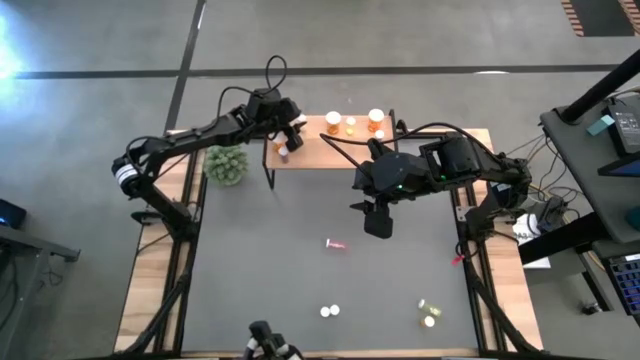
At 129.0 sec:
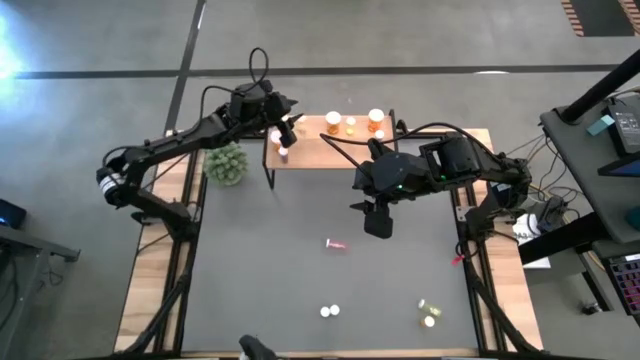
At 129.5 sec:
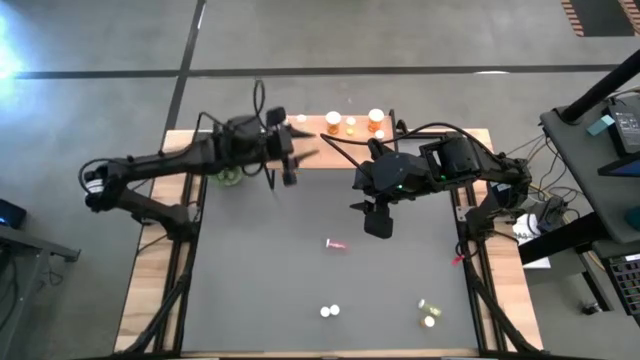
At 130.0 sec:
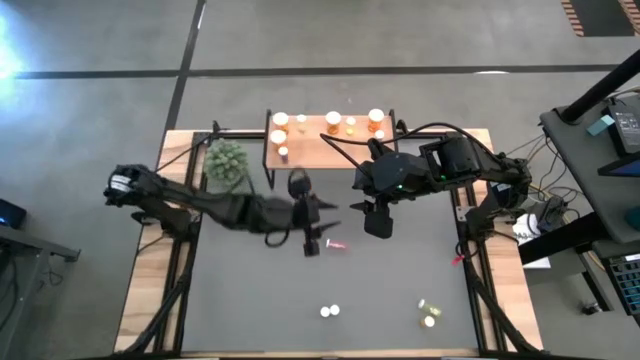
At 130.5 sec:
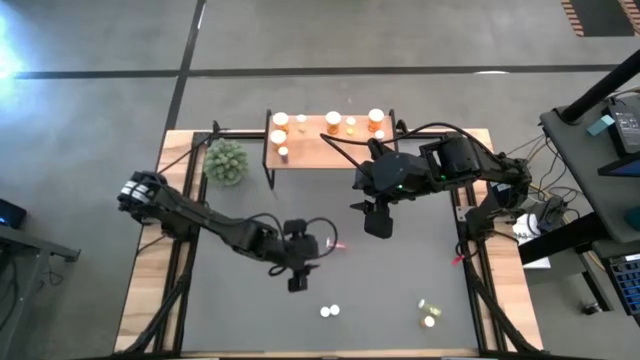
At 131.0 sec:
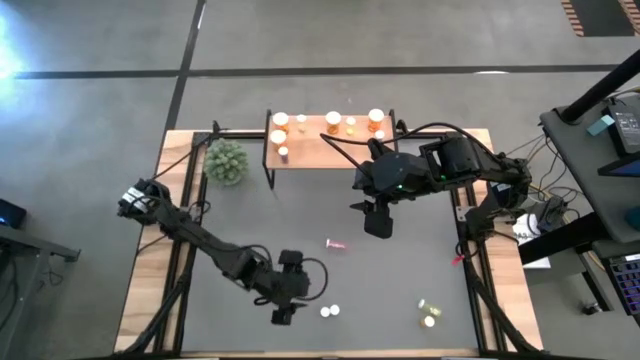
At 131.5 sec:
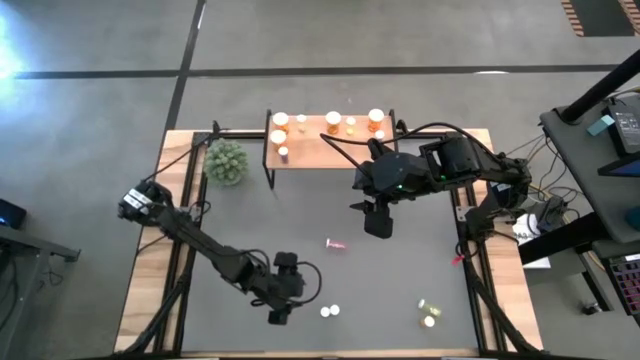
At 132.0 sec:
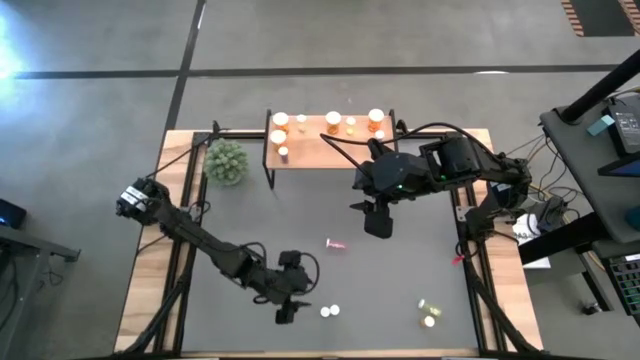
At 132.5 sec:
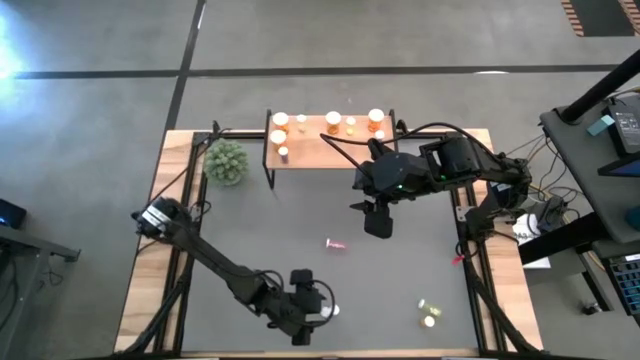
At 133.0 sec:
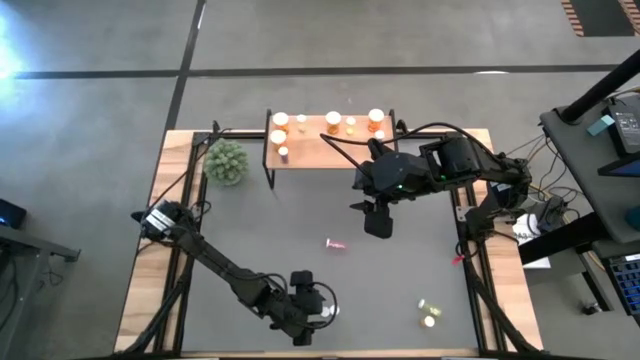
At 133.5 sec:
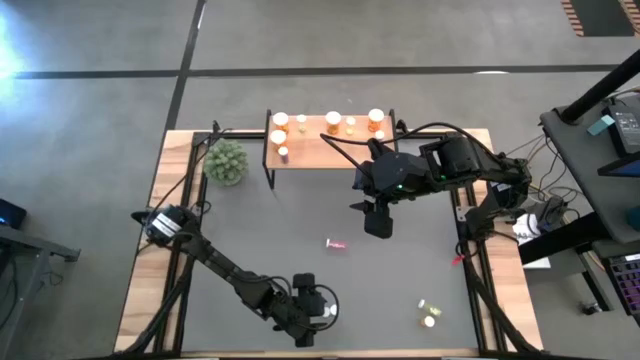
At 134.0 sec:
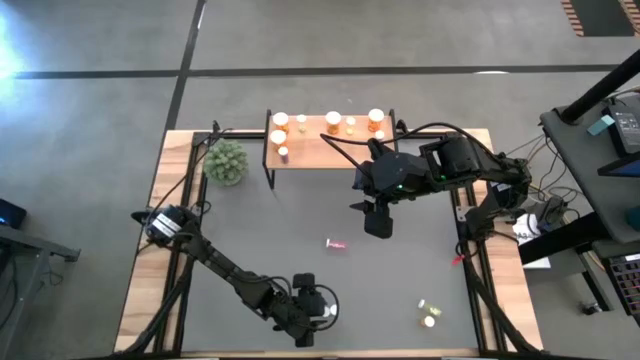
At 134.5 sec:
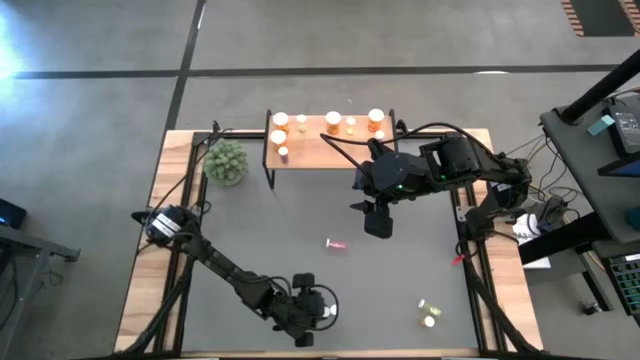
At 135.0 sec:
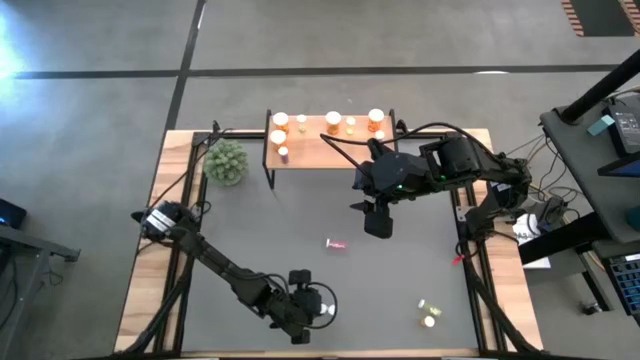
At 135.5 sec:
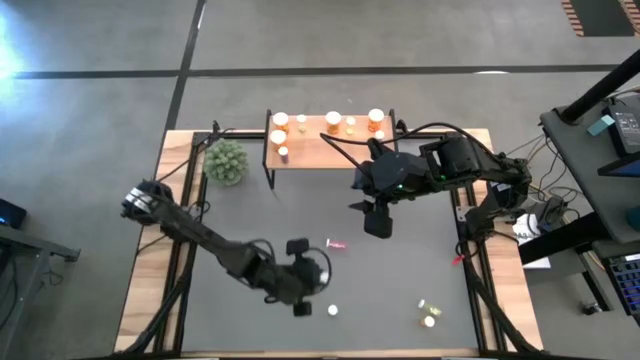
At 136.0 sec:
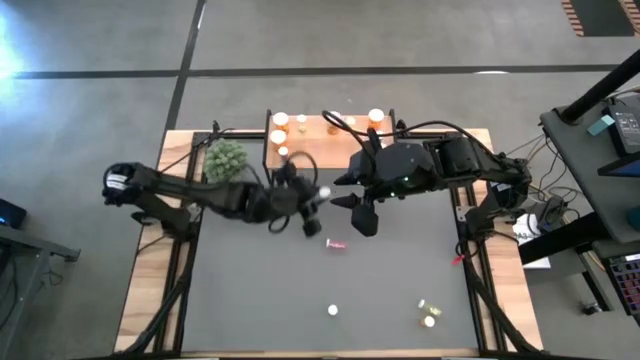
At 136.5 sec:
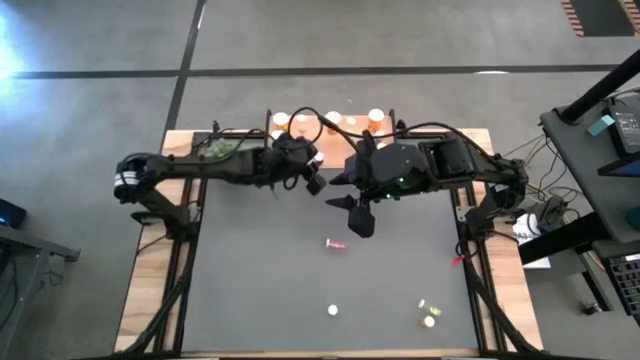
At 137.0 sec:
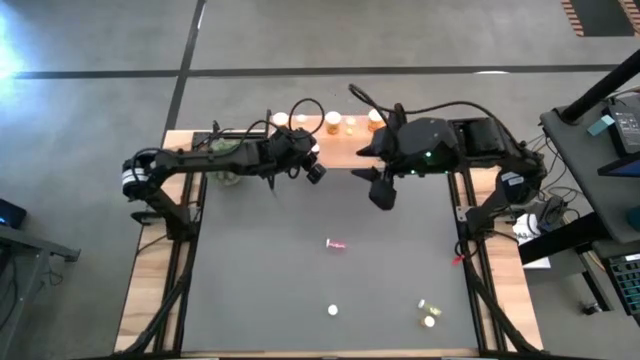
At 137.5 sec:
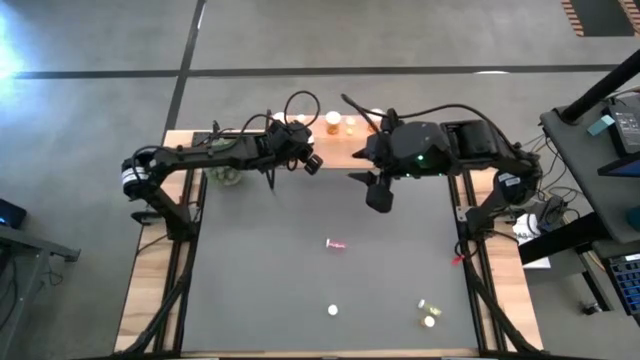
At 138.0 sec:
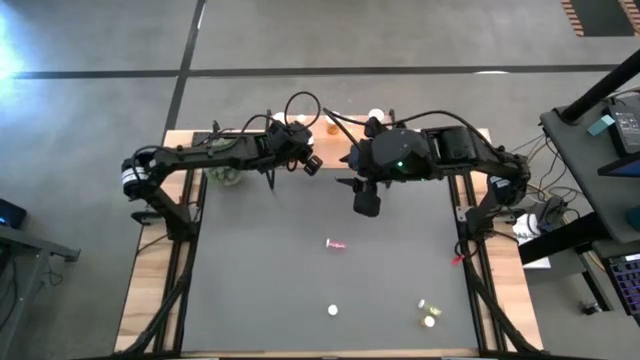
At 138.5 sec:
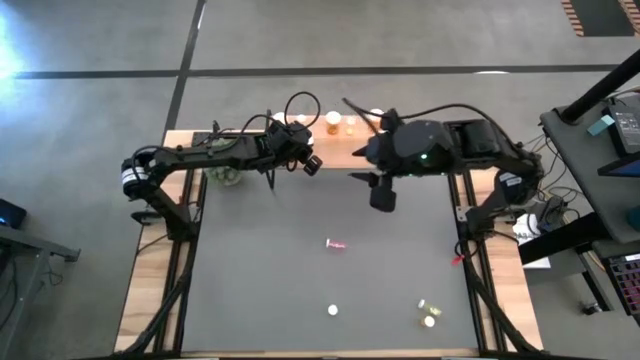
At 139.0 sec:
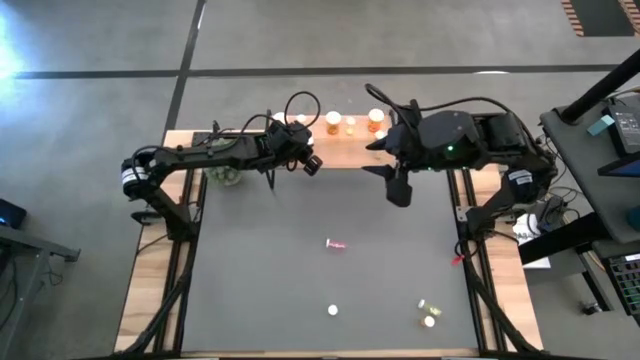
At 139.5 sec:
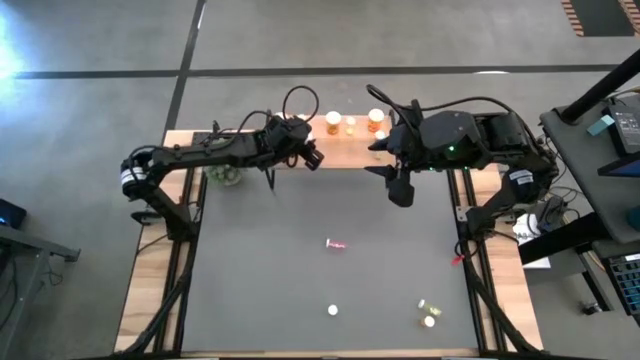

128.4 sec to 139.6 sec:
Task: Pick and place medicine bottles onto shelf by color
Put the small pink pill bottle on the shelf

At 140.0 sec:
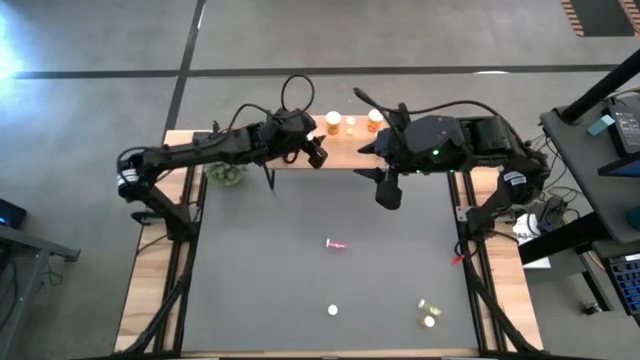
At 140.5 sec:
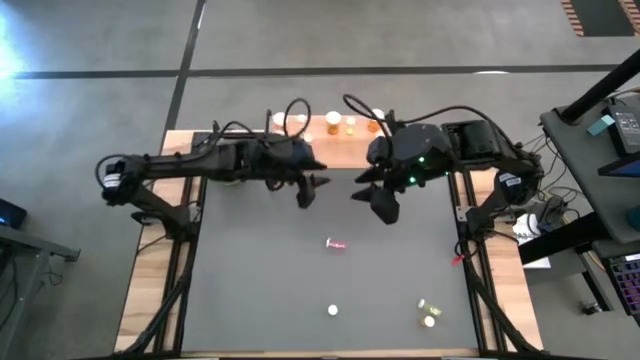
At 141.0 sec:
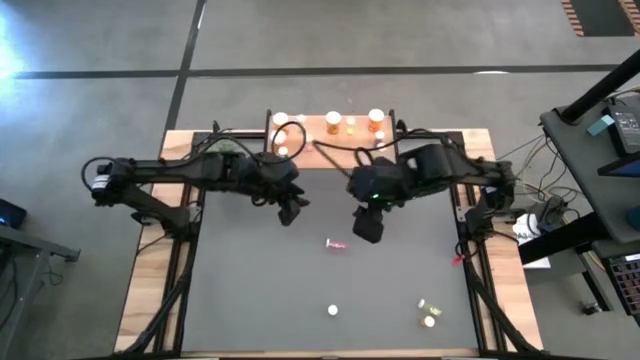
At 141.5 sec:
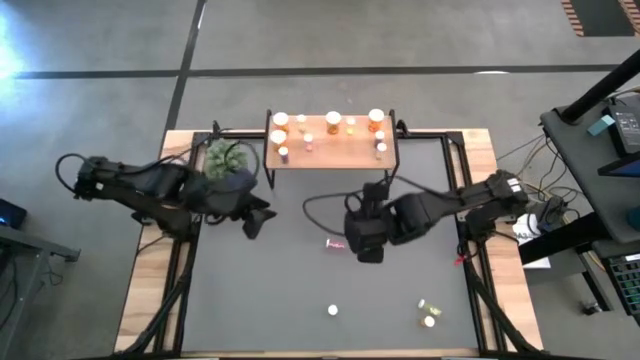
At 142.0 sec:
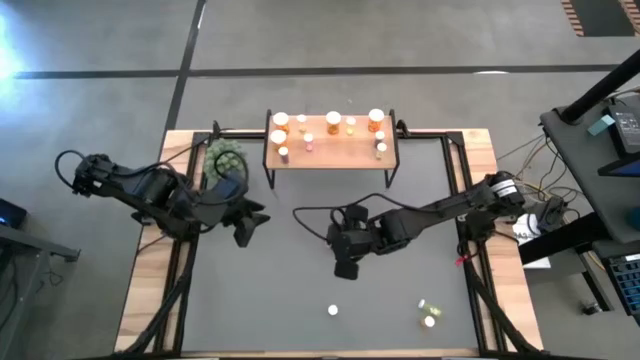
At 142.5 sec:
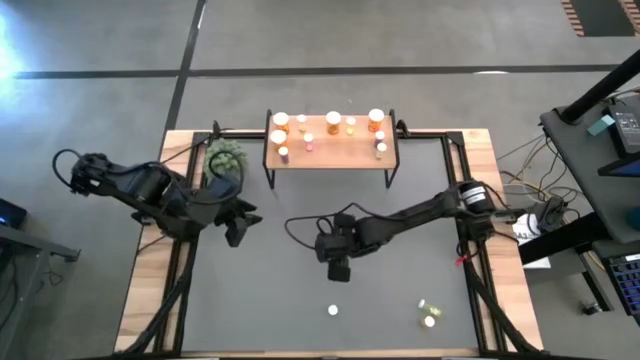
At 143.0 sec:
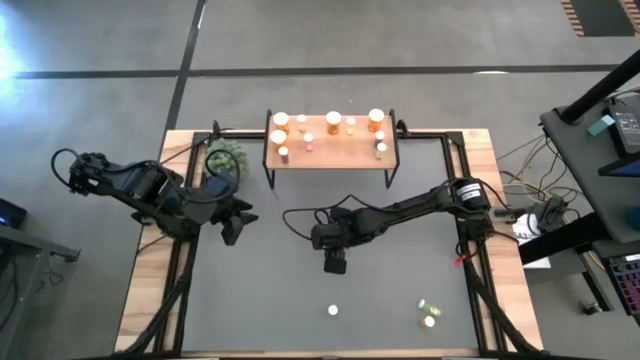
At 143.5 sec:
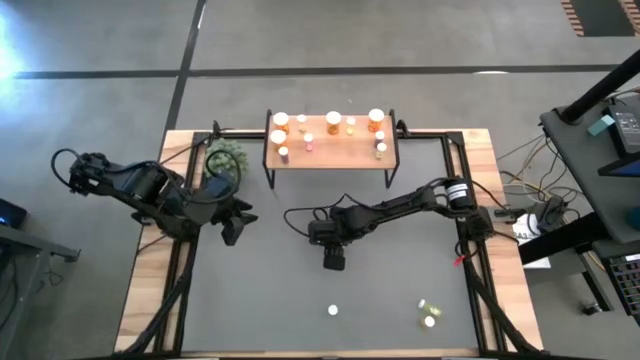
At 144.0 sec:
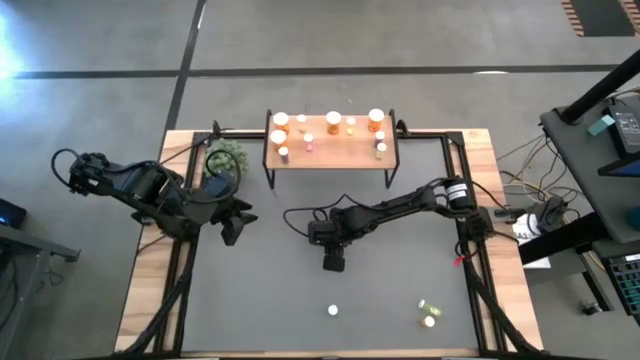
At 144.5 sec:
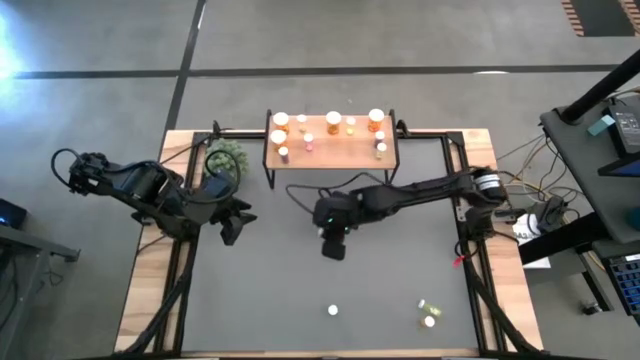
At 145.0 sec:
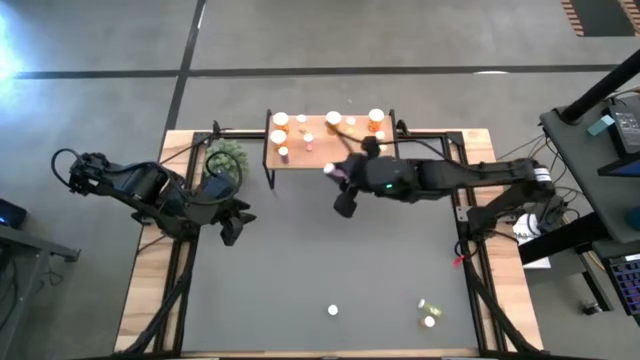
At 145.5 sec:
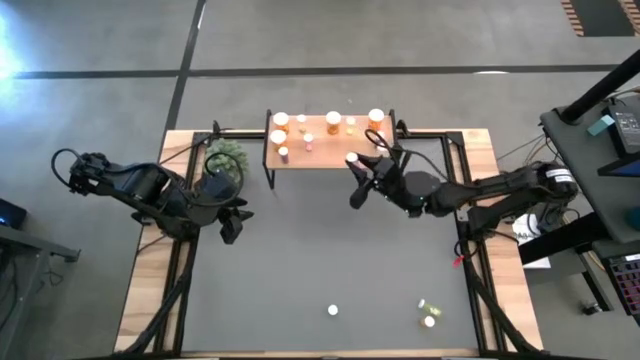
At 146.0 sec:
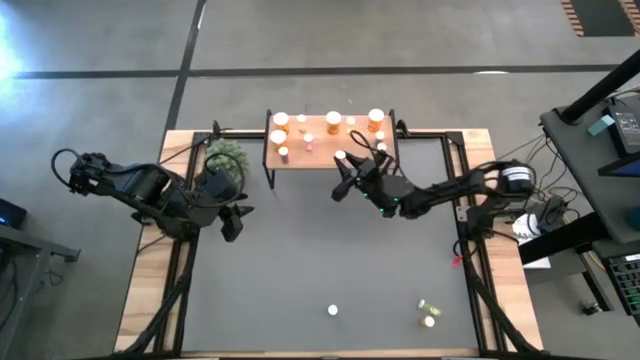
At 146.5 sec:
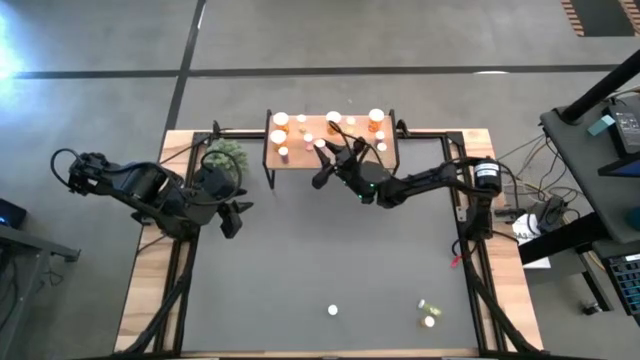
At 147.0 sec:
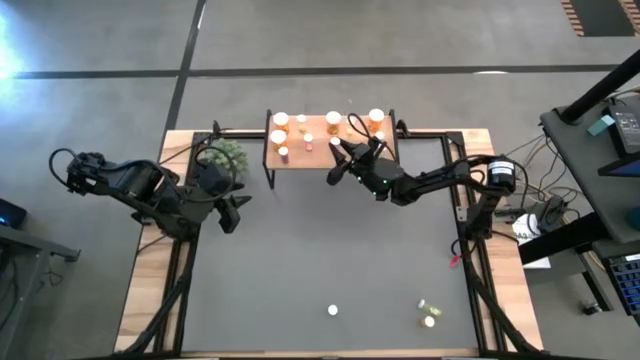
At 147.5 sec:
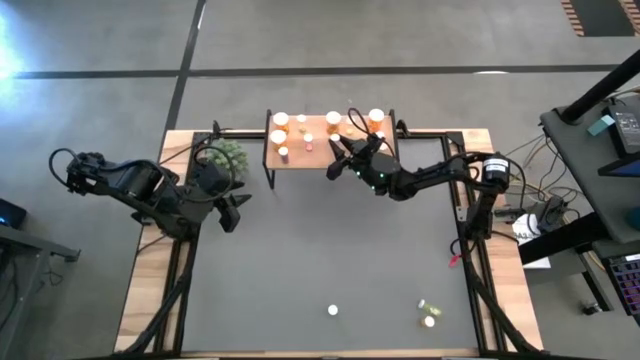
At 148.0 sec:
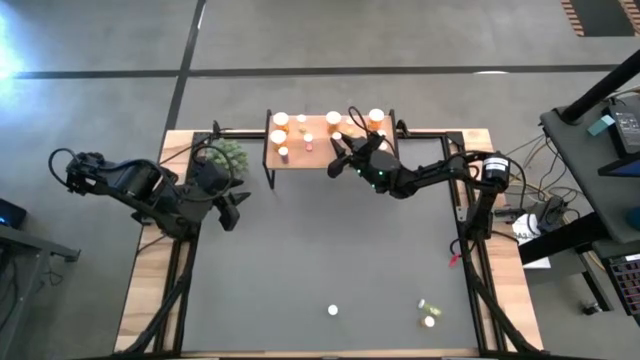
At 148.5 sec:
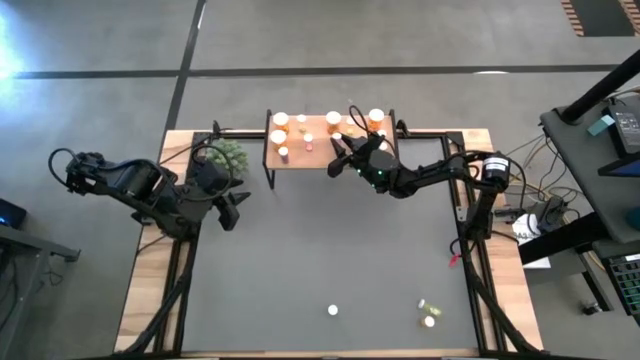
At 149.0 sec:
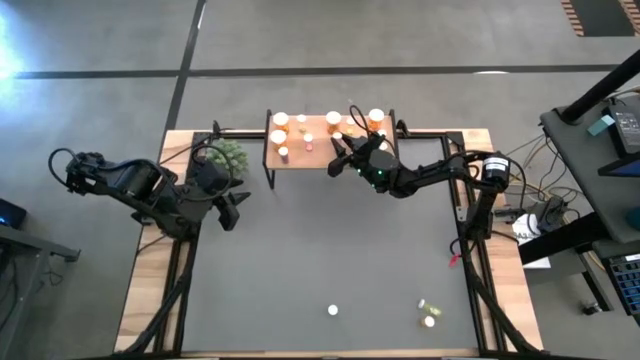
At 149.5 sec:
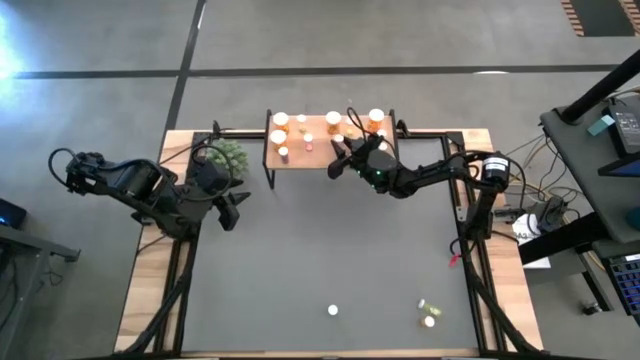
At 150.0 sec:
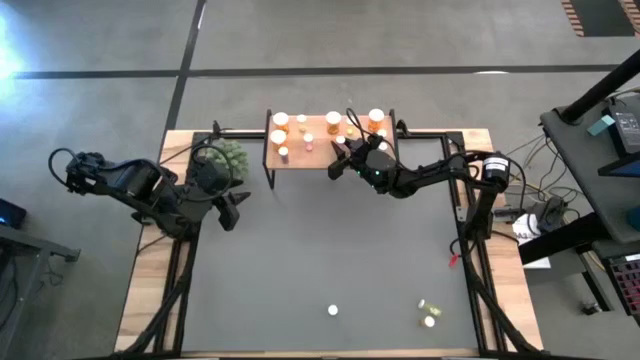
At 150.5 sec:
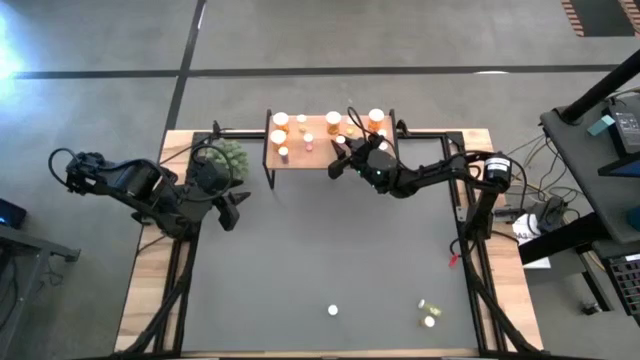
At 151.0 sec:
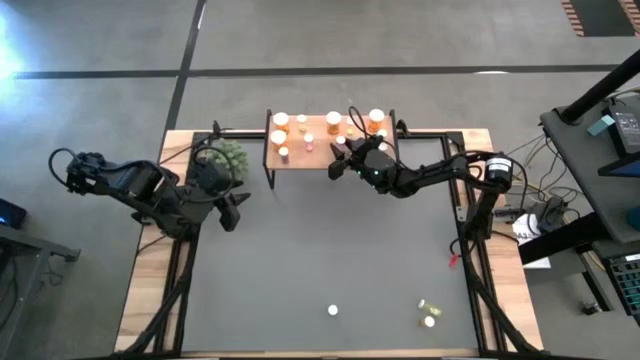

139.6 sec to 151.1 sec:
Put the small pink pill bottle on the shelf
